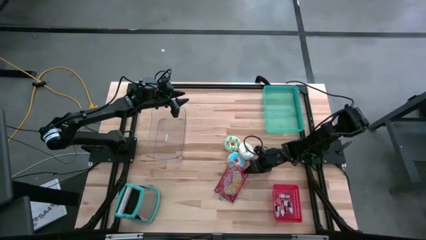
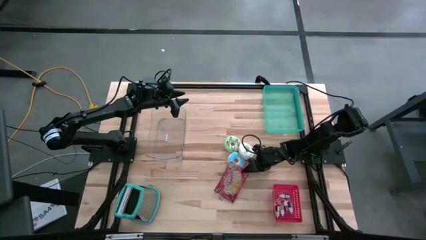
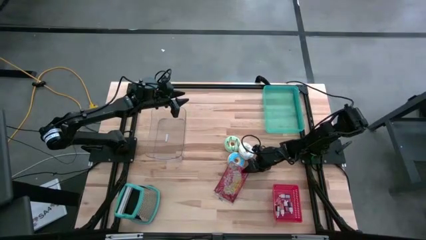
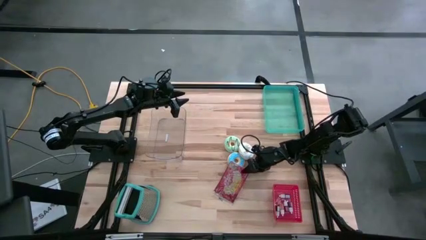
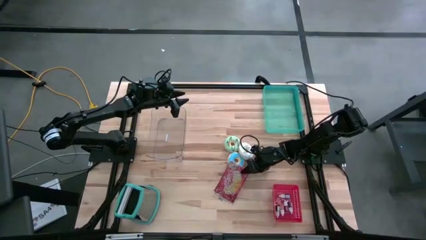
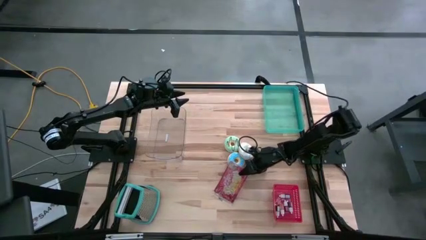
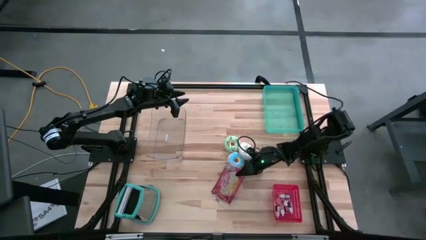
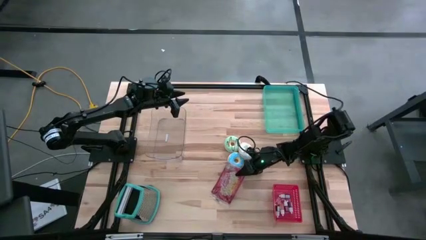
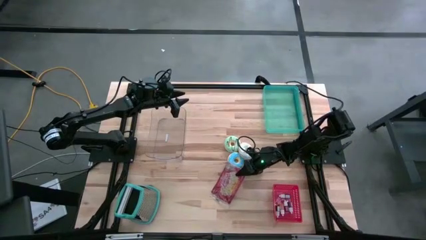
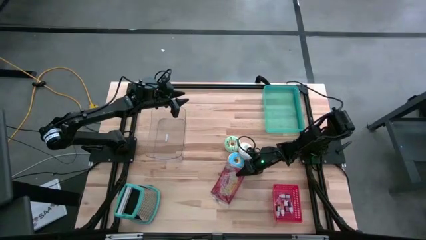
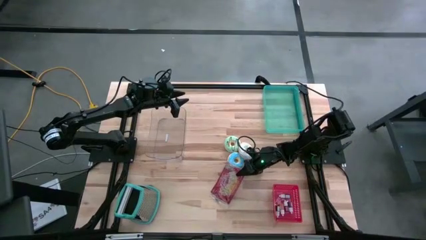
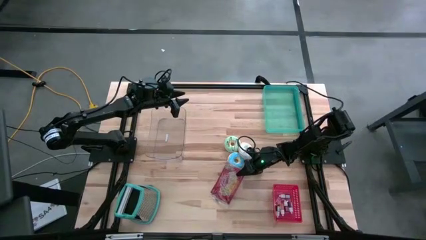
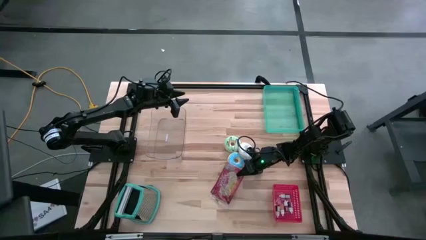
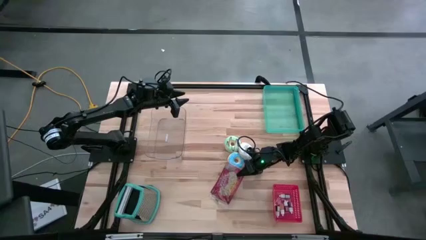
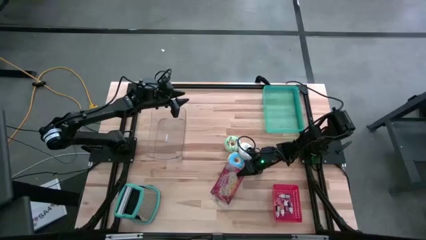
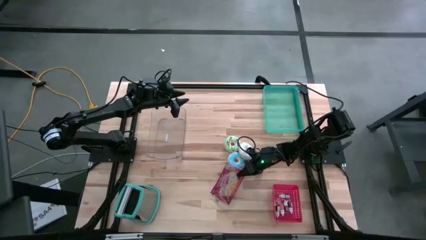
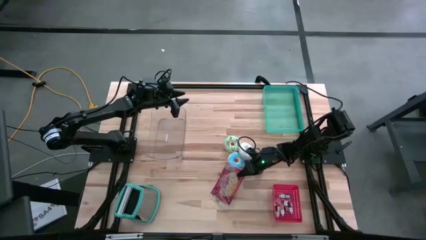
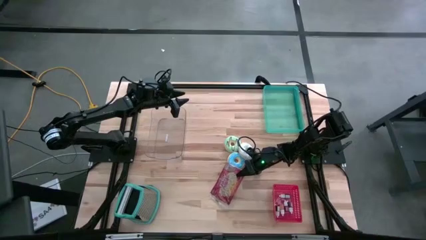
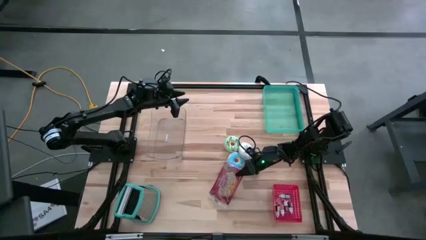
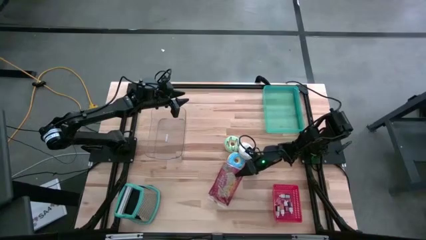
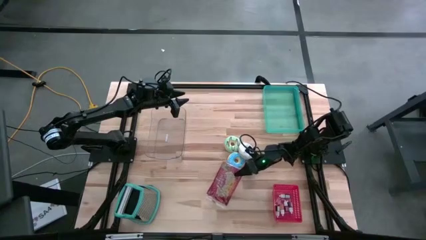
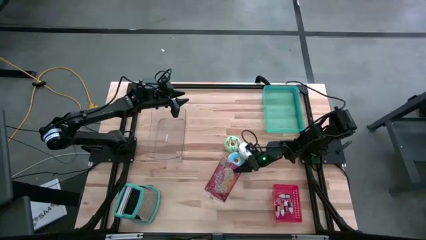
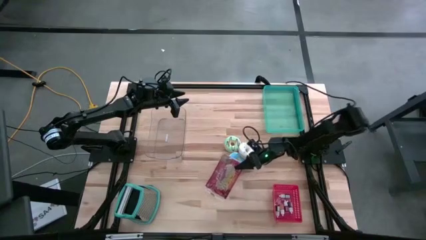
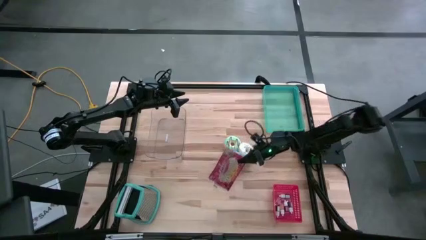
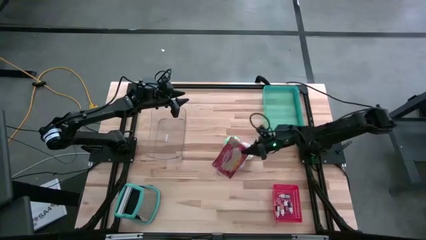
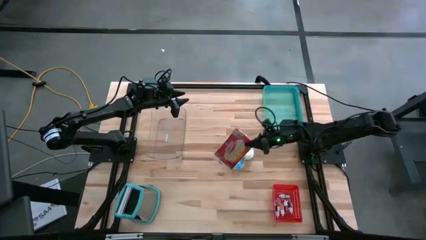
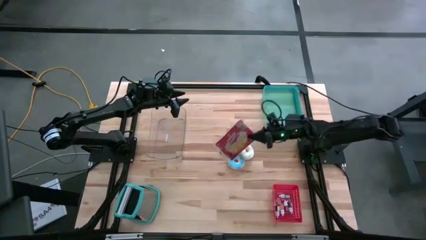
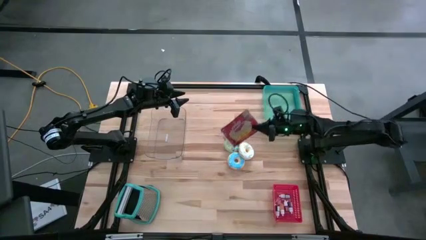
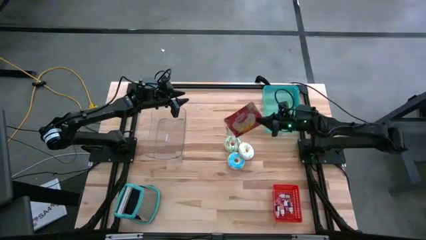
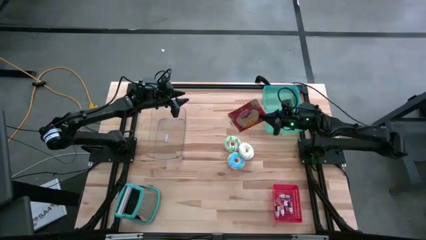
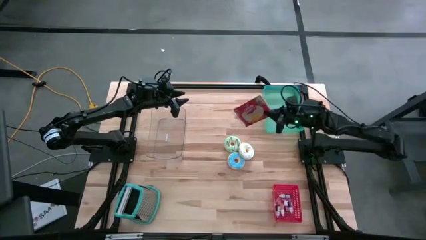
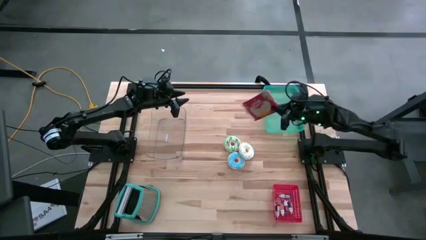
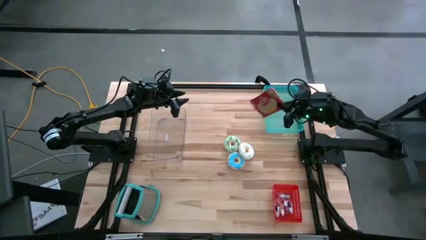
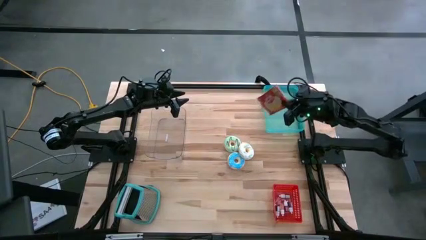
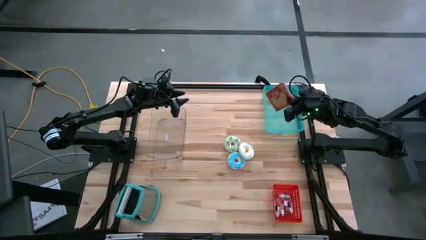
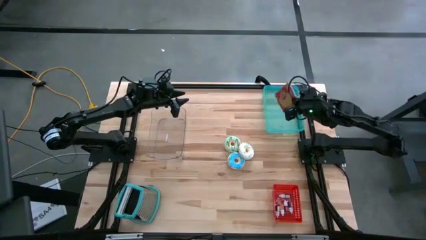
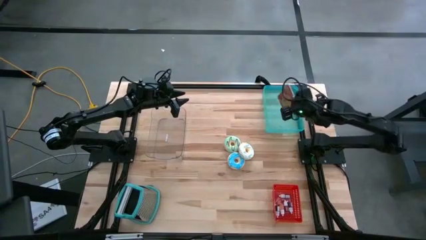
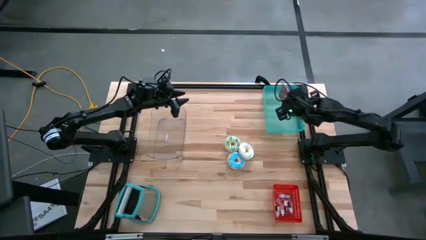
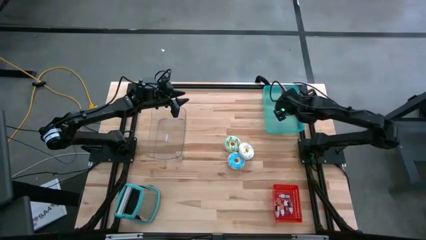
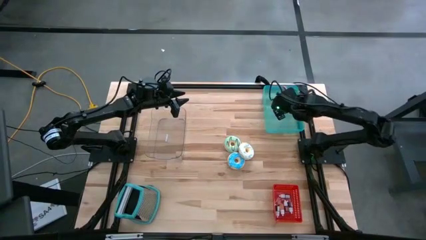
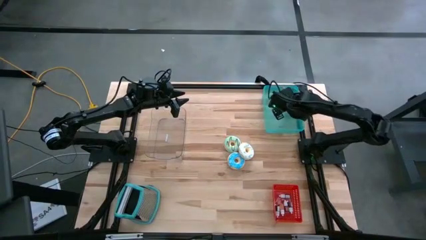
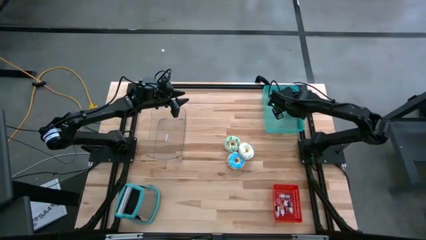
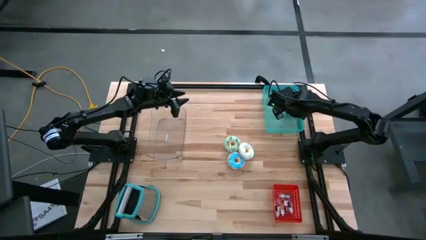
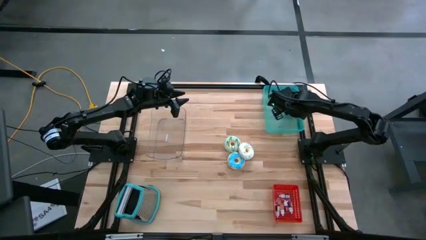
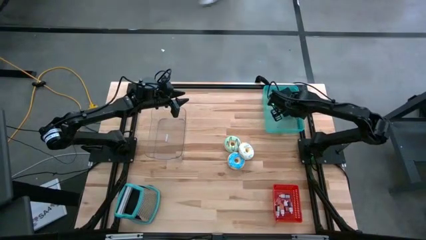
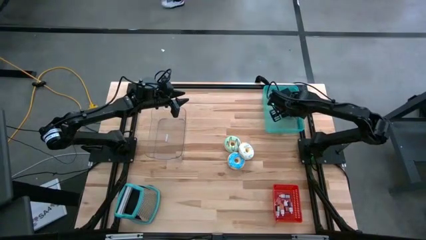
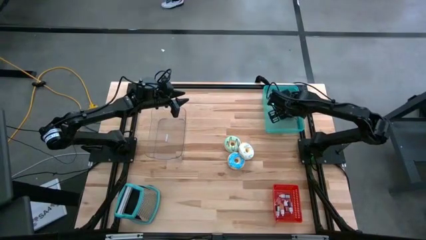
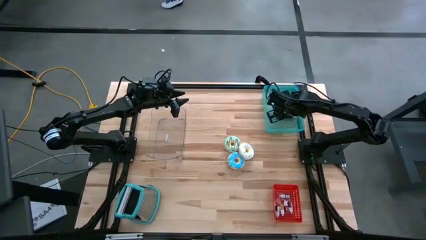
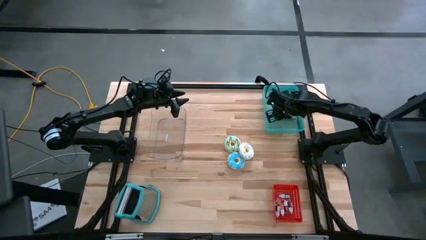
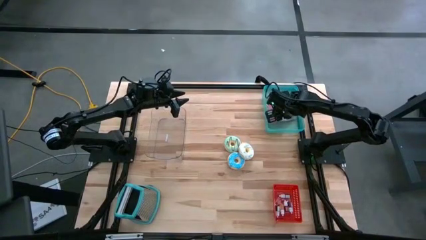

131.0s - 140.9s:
Put the red popcorn bag into the green bin
